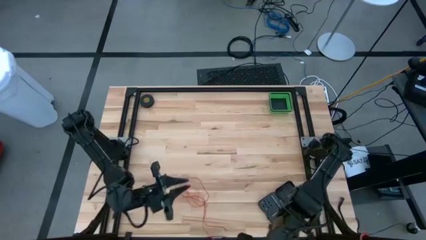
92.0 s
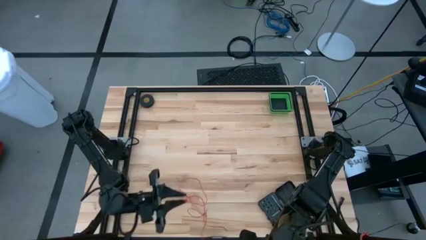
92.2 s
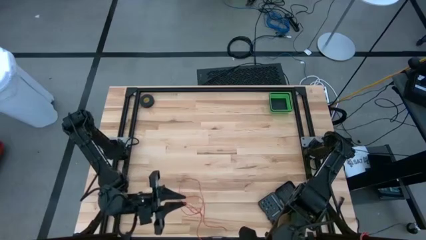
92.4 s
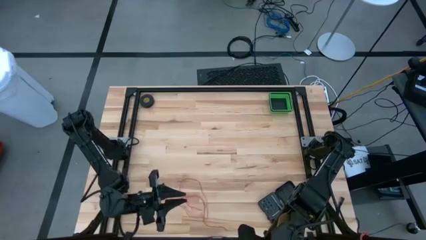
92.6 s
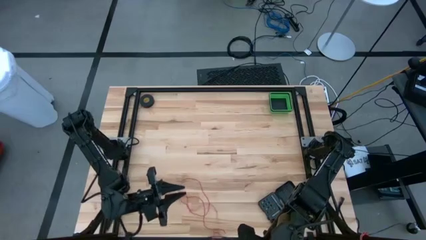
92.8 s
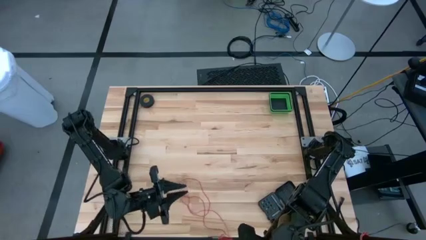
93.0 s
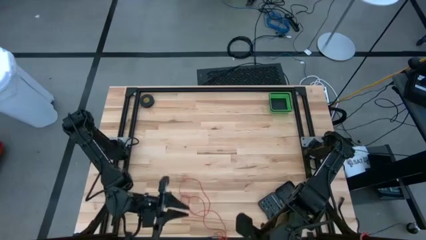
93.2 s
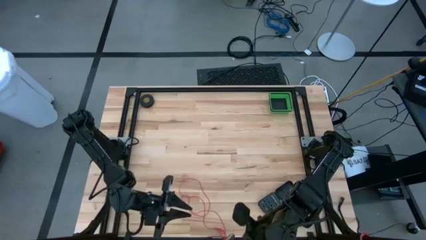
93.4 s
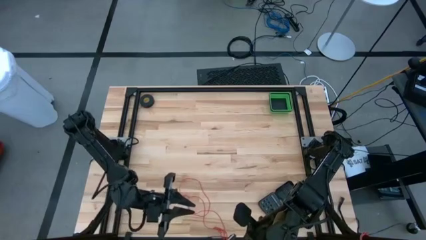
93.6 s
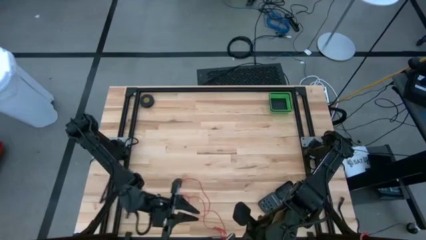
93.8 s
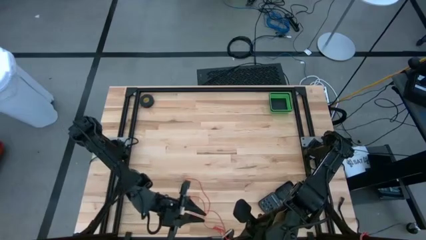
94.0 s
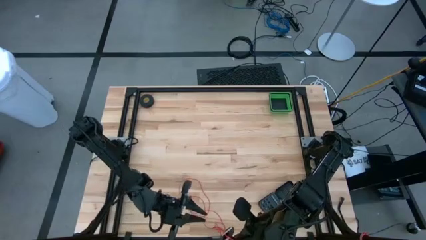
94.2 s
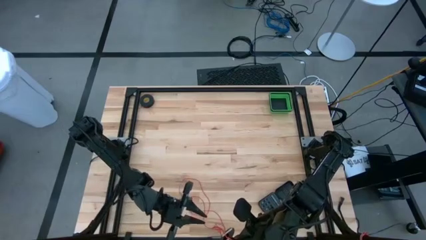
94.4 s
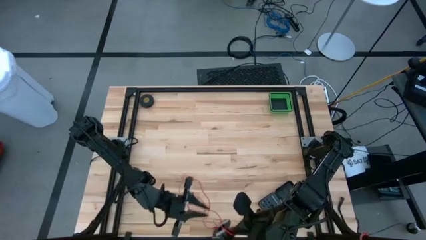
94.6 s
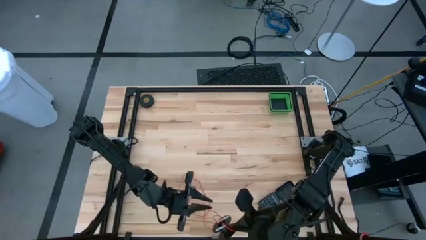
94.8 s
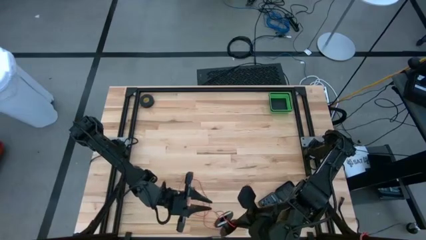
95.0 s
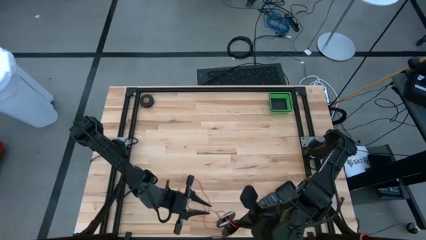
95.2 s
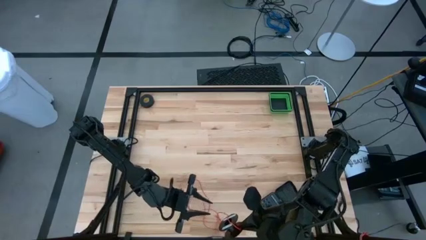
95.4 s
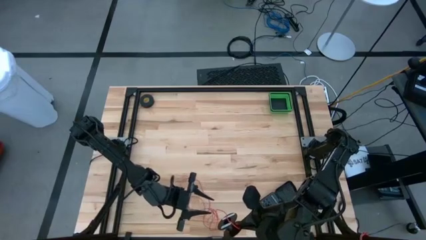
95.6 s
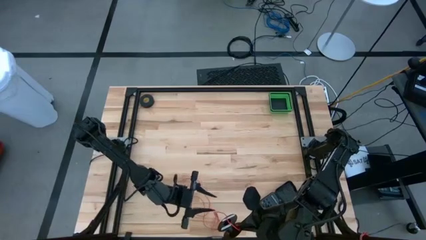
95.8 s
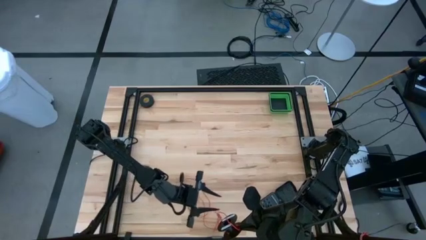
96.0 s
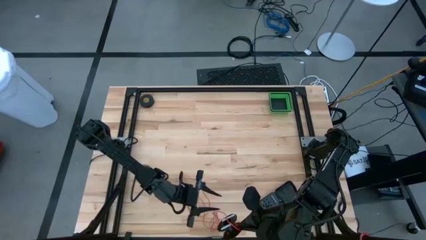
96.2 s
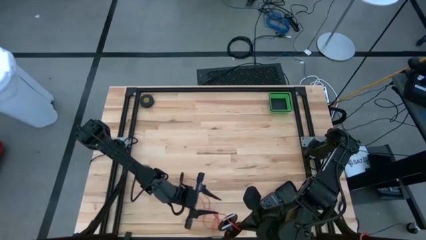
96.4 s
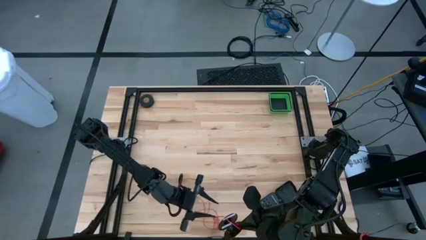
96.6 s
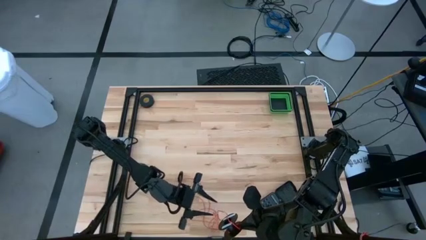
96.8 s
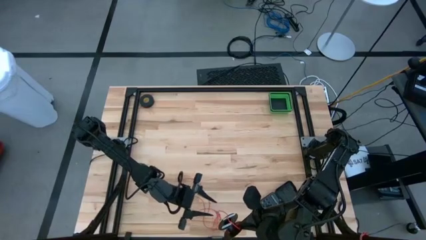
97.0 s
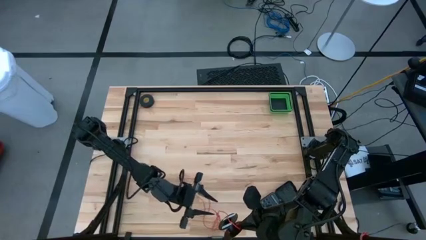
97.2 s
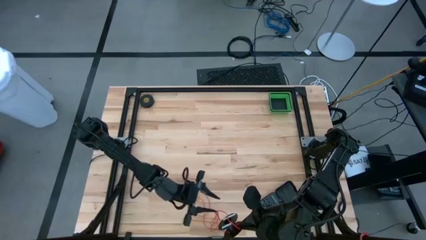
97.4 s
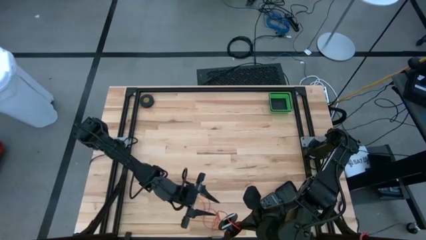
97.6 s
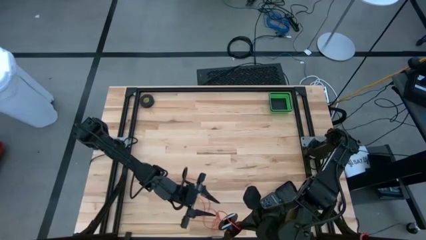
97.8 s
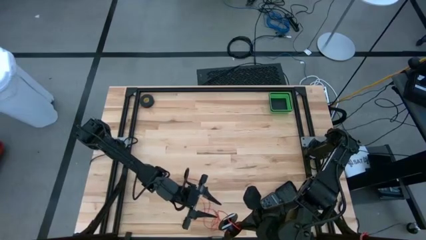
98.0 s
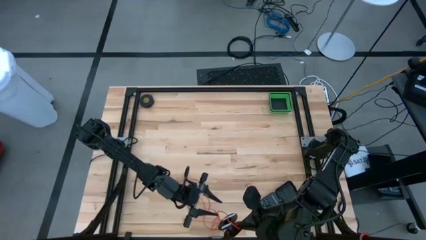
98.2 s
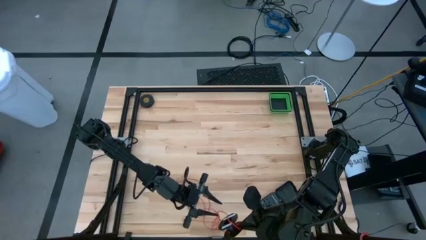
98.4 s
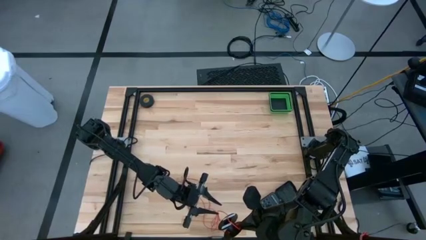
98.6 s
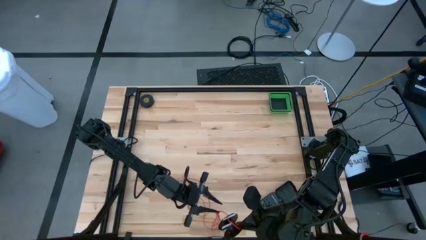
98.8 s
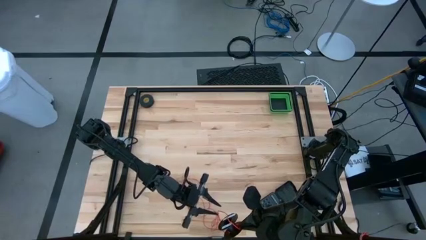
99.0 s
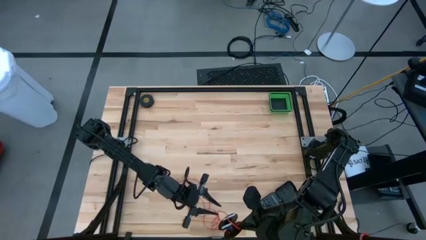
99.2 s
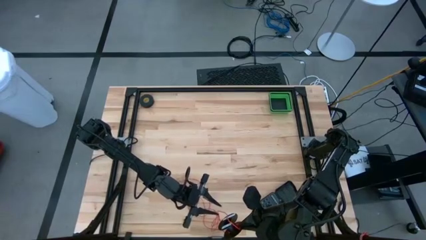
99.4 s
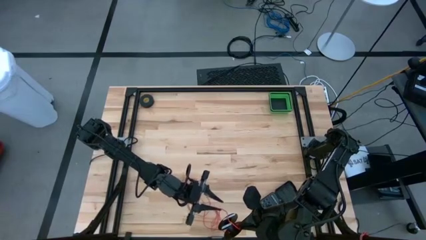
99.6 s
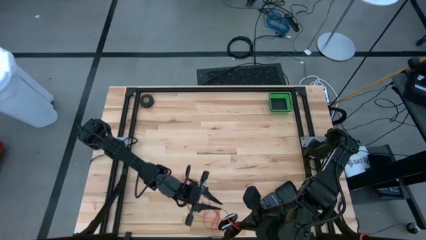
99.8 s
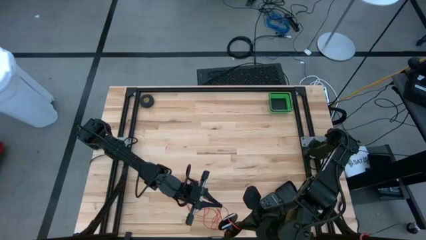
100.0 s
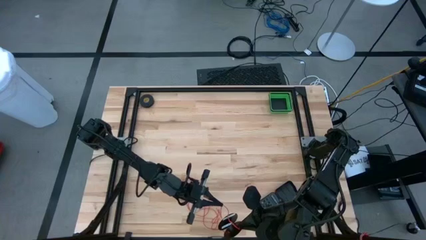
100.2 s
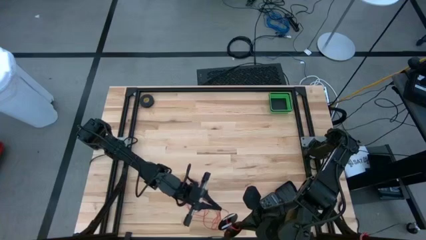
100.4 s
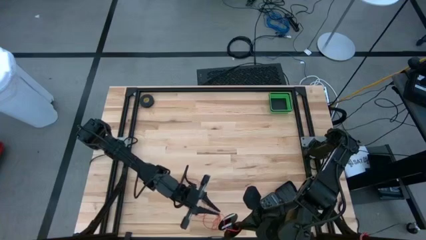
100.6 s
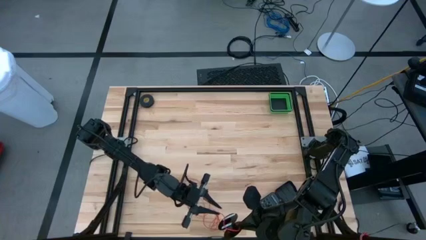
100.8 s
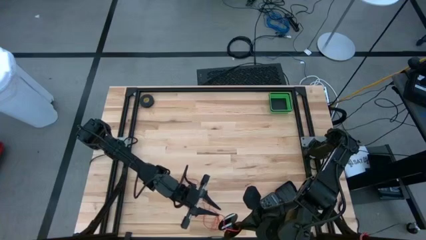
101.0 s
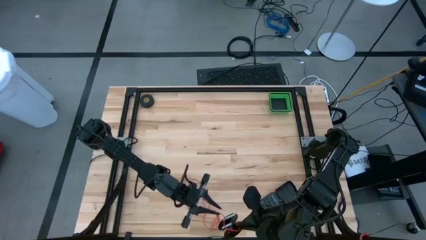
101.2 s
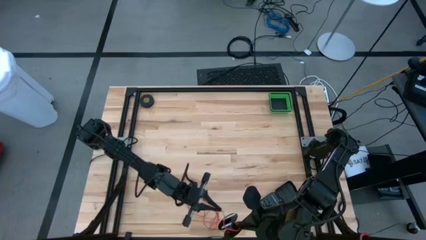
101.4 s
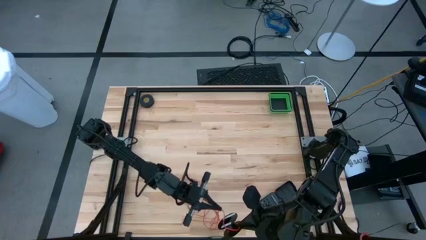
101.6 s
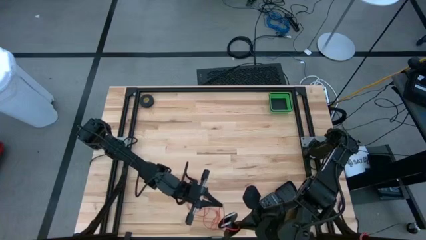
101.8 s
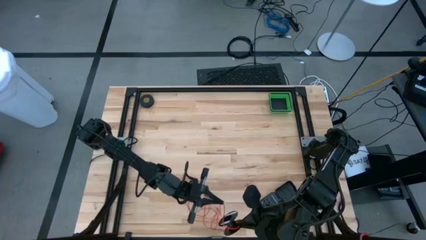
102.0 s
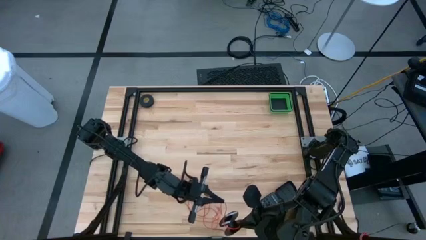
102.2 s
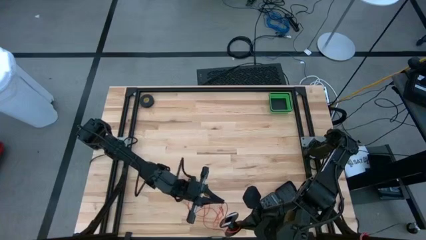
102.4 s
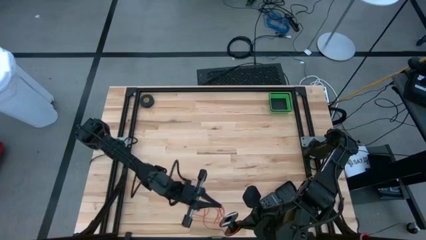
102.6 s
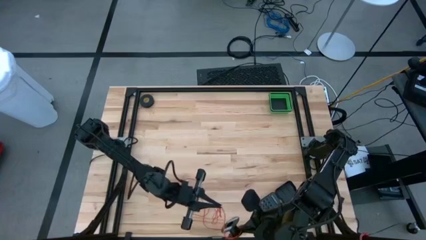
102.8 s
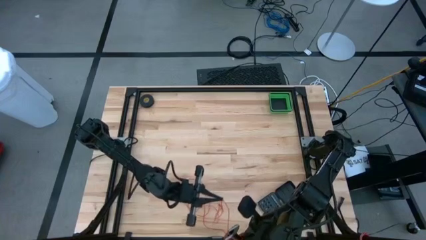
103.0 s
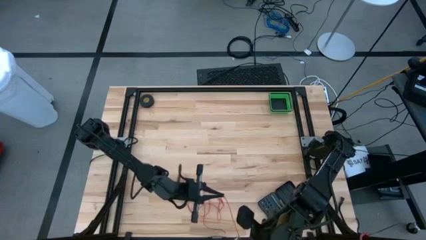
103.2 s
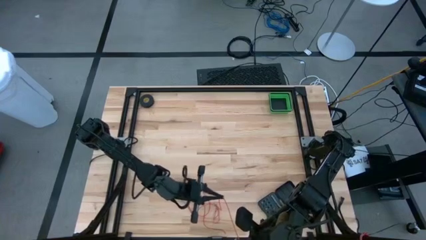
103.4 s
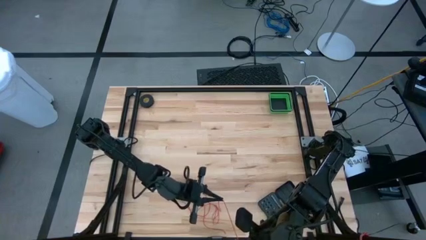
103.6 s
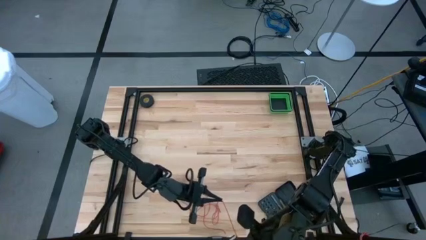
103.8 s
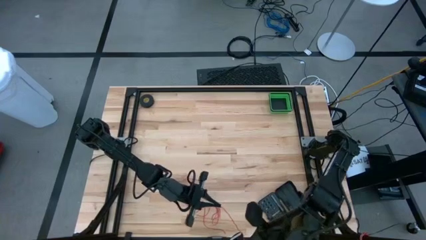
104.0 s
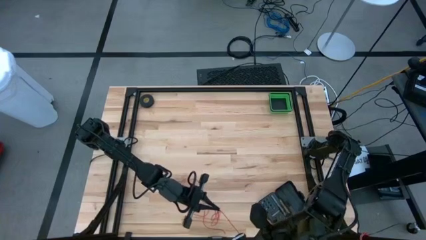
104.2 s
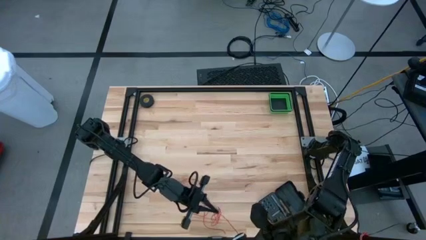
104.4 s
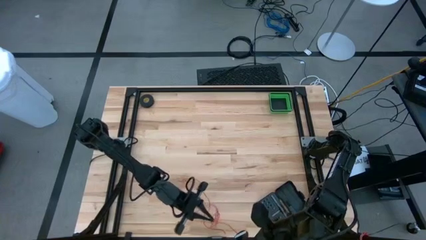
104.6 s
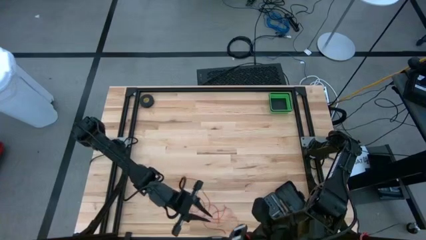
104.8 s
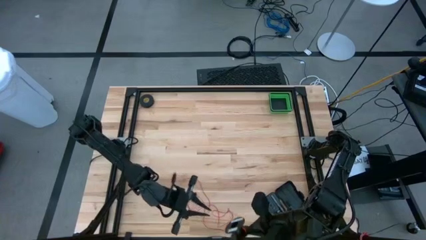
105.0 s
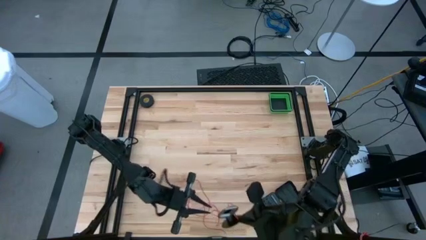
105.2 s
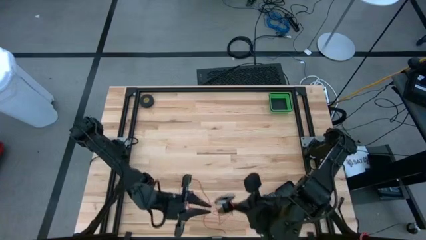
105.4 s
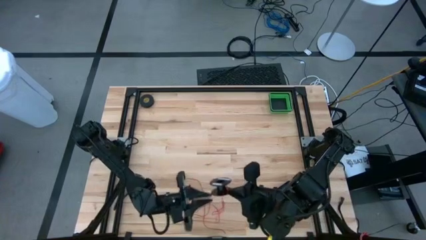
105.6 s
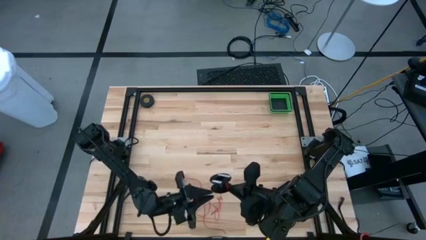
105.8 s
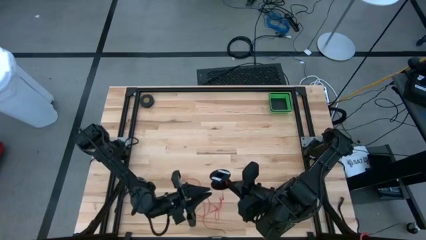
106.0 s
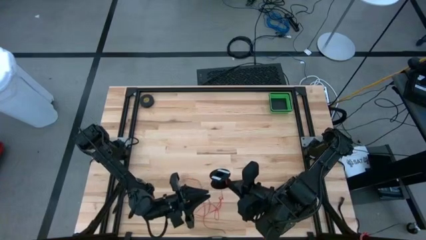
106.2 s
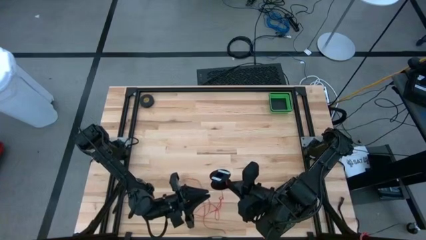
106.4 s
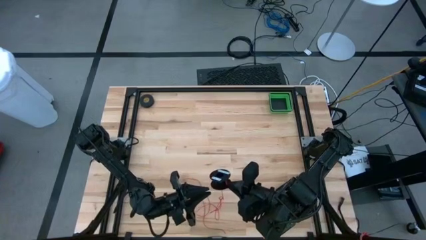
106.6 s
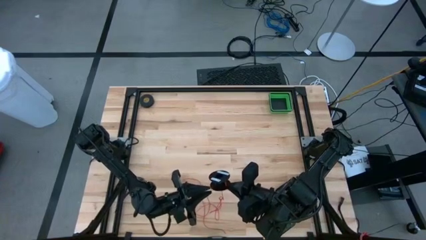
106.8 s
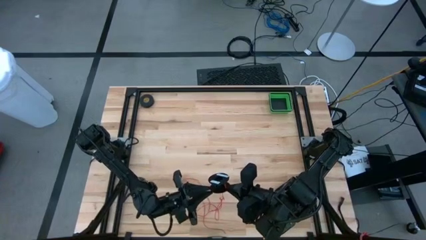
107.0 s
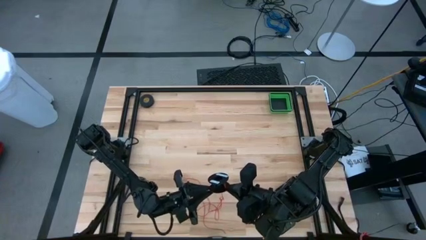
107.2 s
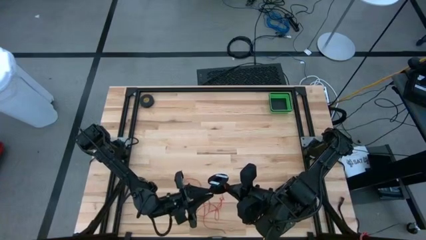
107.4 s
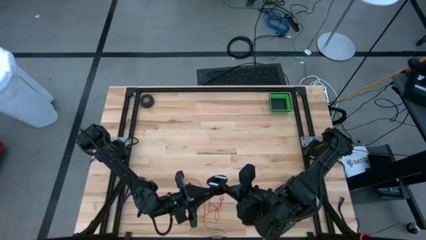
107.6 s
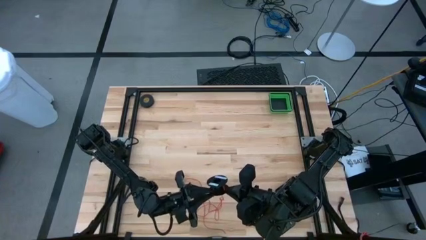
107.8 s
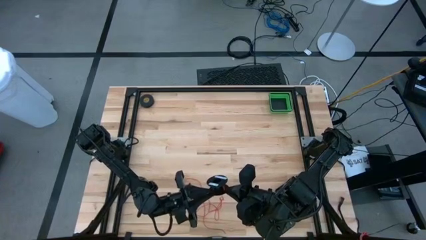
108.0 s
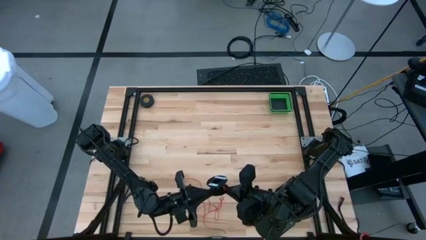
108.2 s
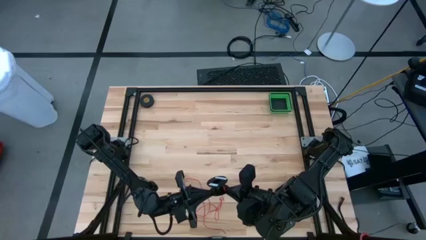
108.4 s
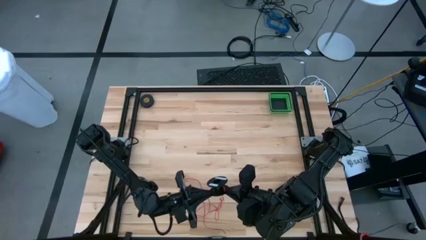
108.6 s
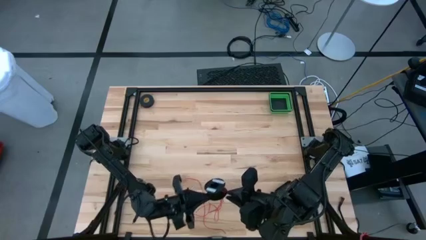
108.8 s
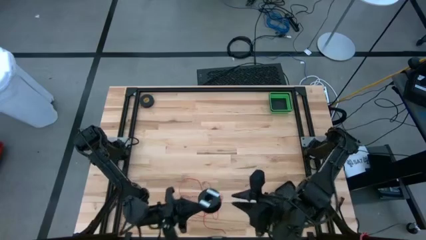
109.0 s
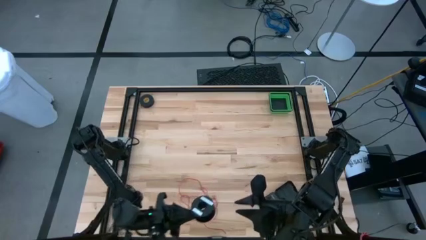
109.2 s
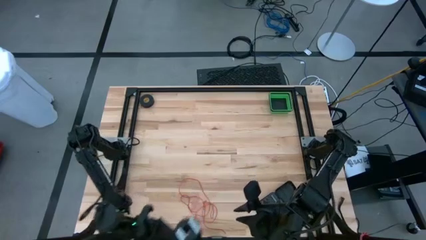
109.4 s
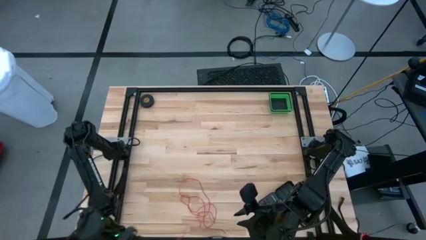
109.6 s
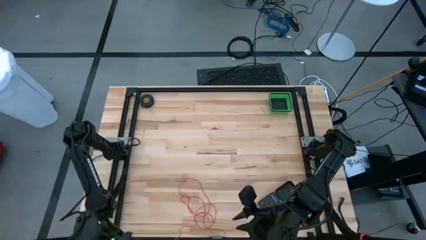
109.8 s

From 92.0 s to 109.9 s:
Task: Coil cords
Uncoil the red wire on the black spool
